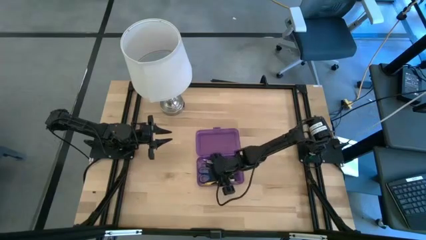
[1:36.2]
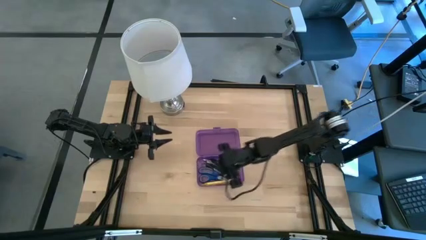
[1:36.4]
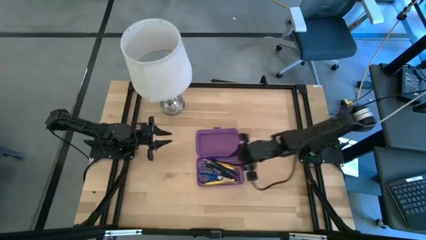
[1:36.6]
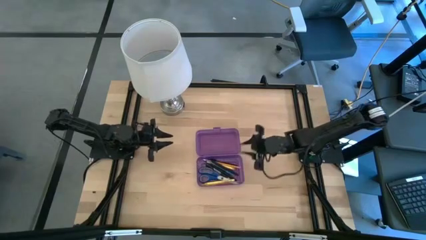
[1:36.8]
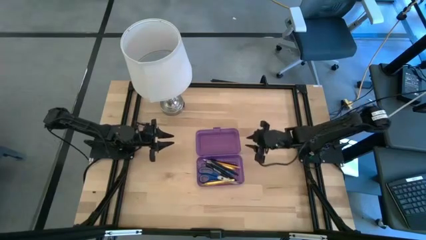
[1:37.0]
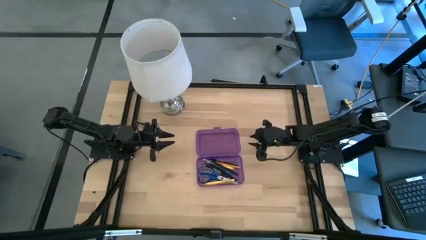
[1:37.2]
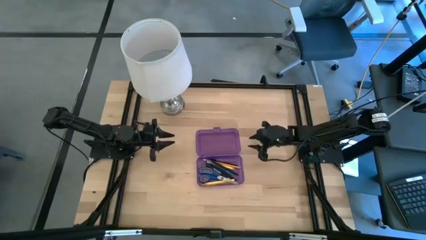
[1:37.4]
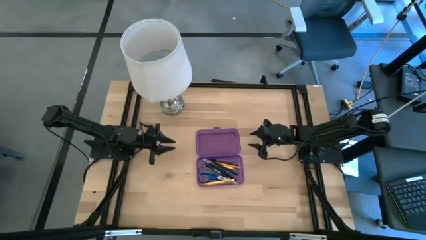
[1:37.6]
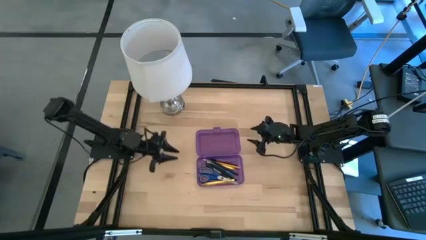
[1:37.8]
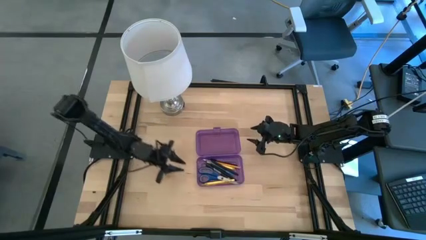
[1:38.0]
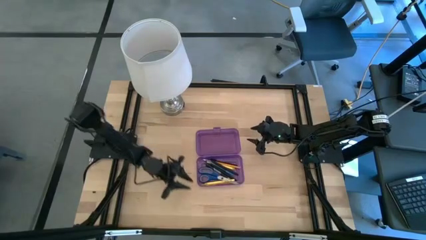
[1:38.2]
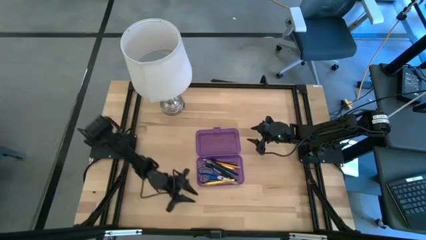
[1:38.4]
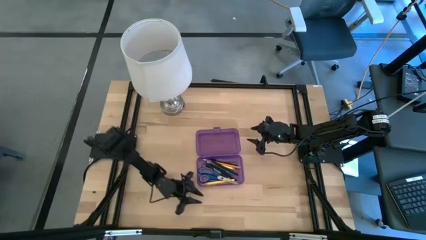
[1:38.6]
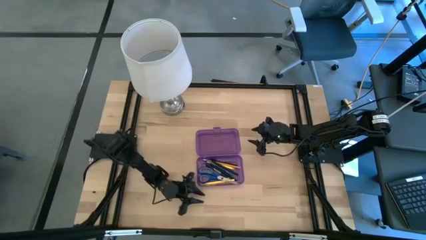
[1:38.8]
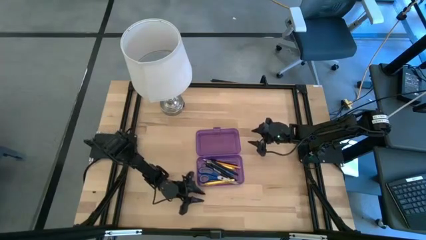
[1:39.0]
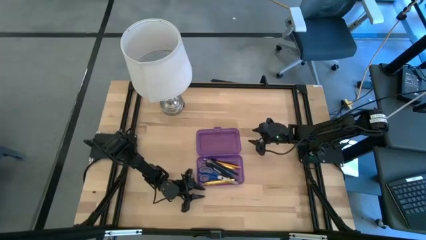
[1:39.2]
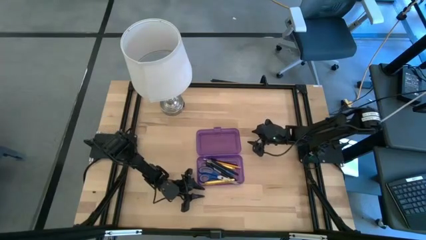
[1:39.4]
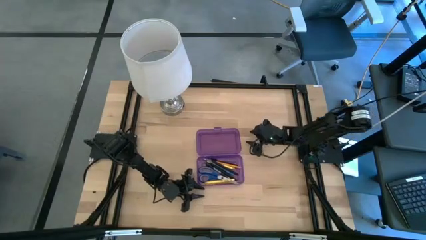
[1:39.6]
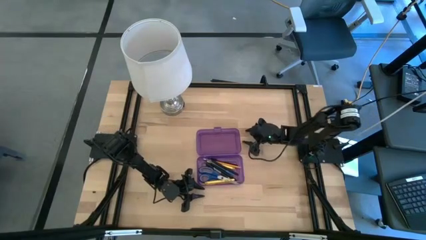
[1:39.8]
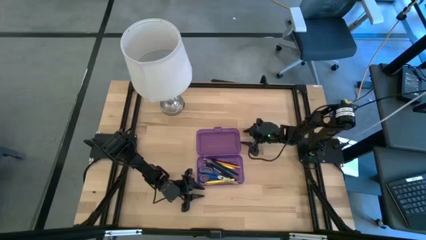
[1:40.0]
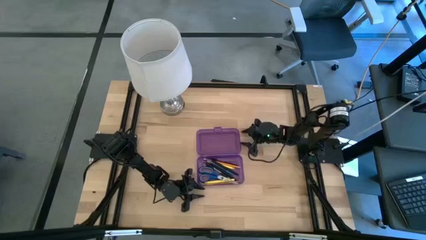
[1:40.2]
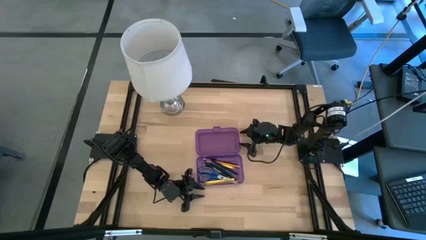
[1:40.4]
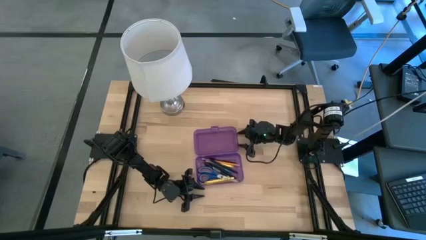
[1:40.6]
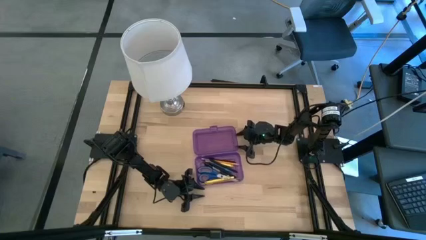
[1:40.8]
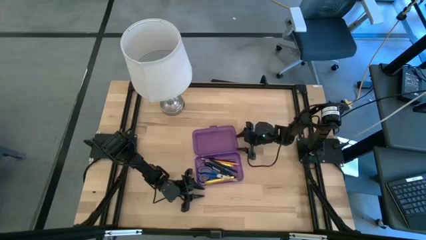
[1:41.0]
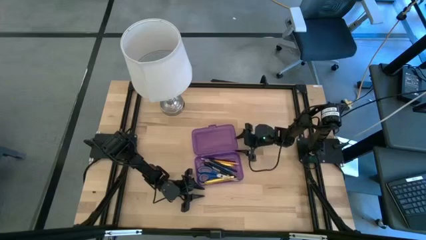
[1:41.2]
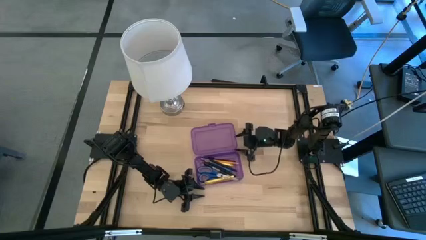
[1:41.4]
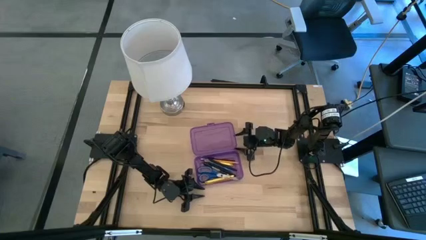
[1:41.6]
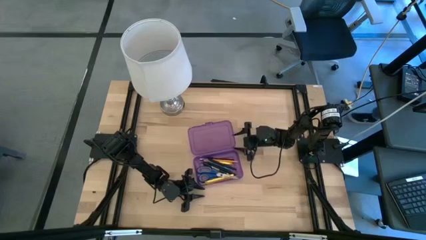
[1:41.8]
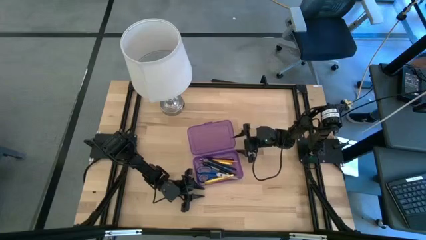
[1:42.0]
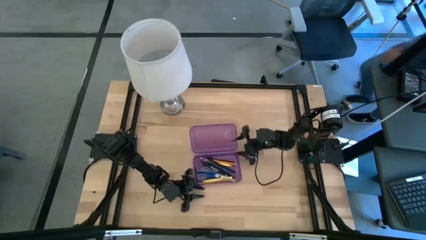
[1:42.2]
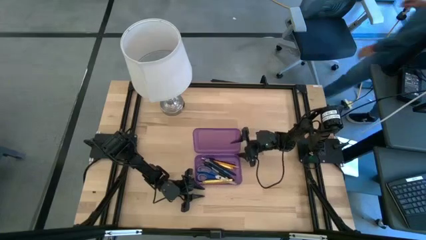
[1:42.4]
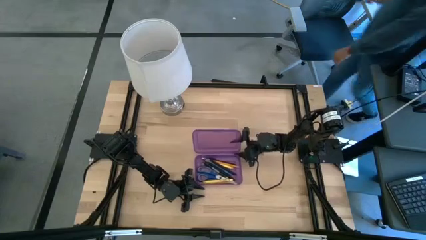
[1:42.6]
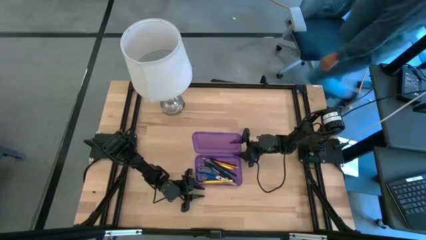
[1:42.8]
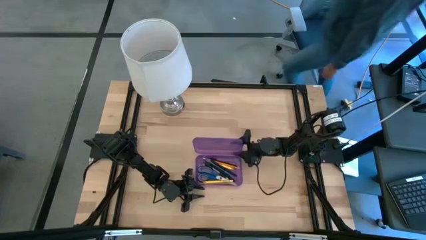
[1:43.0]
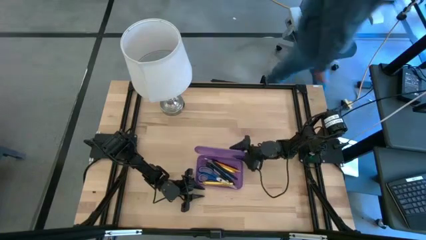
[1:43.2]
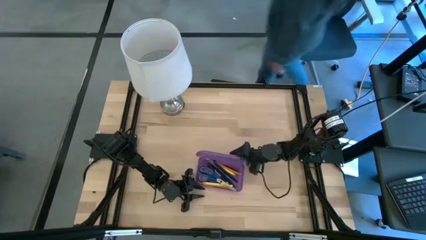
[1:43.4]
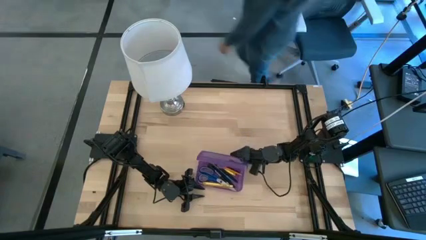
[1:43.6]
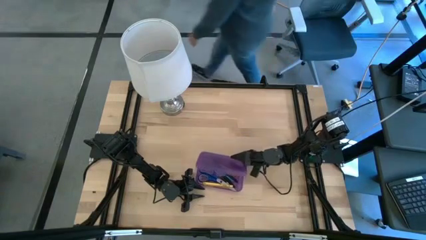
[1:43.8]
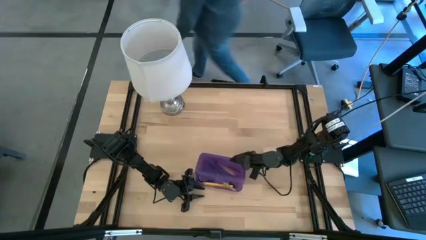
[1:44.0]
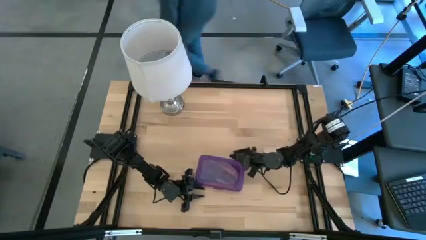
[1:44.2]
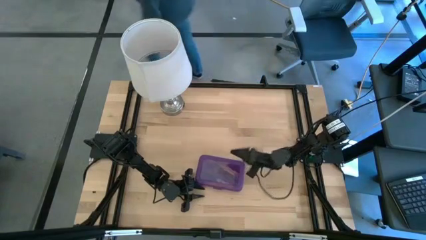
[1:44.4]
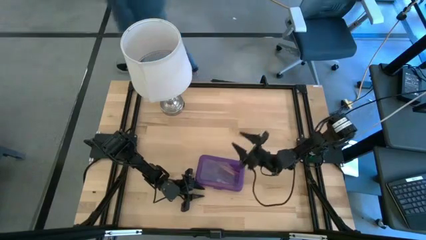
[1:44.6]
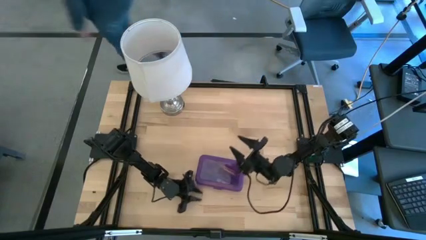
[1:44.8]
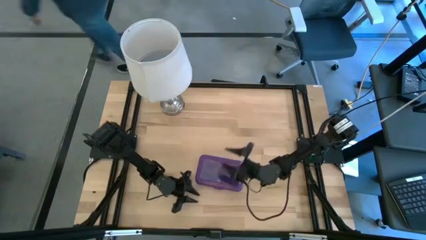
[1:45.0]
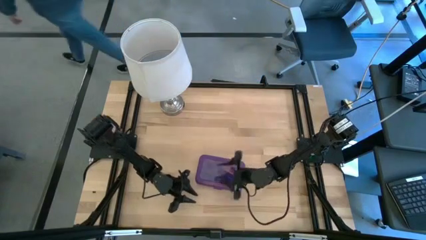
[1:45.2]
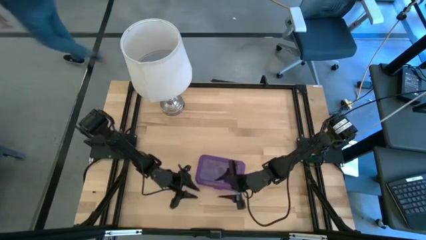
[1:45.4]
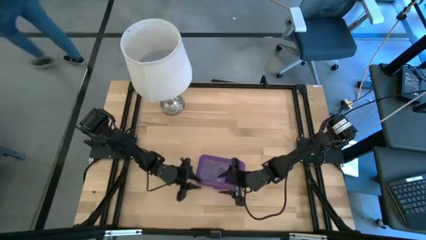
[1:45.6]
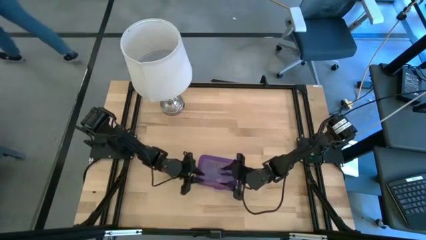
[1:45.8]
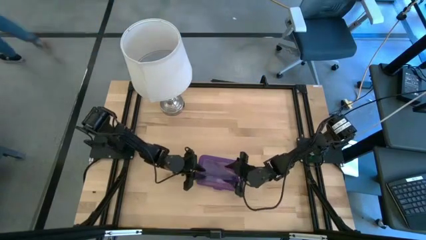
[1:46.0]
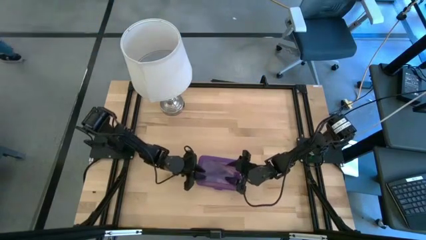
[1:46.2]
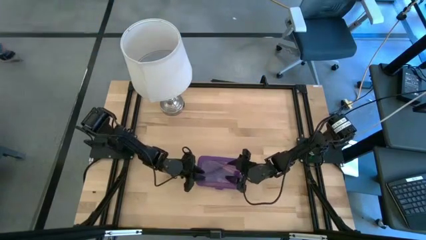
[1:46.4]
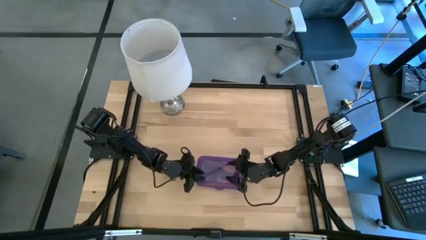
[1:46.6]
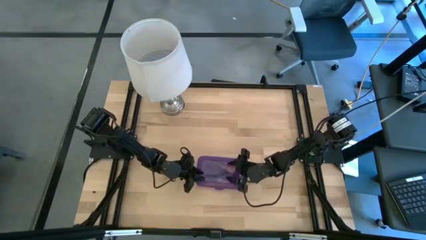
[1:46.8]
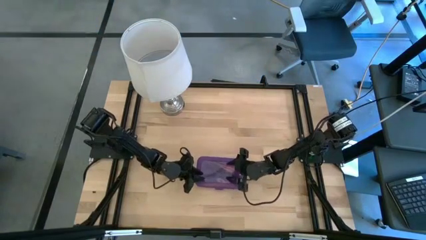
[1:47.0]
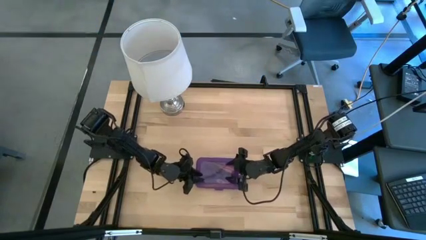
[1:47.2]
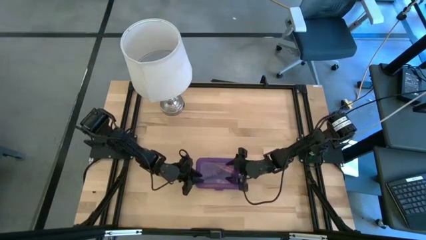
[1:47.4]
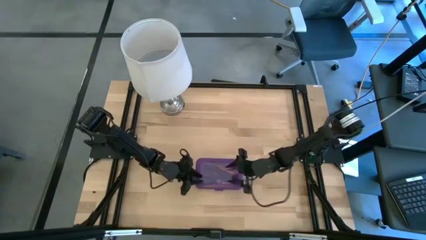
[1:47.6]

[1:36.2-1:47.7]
Task: Pick & place school supplies into a supply box
Close the purple supply box

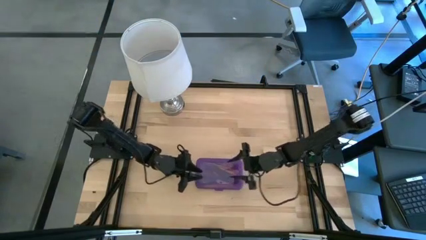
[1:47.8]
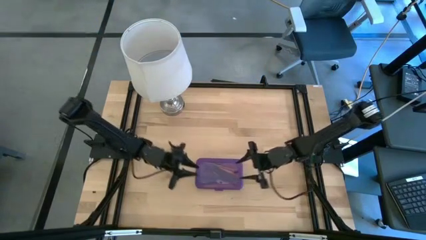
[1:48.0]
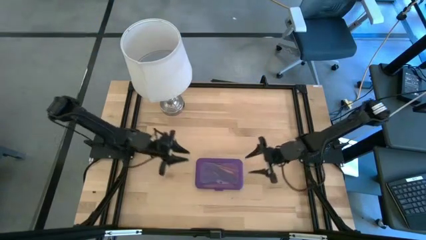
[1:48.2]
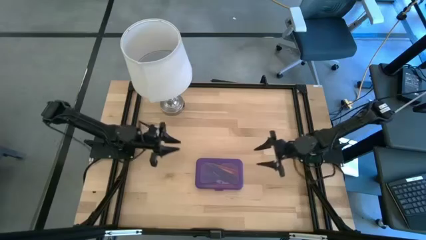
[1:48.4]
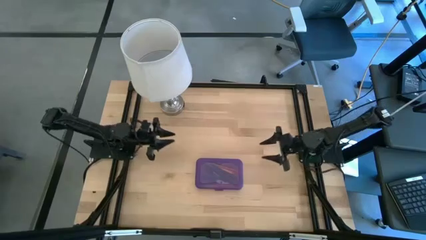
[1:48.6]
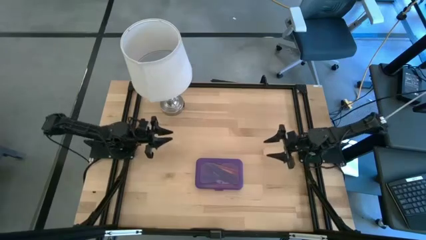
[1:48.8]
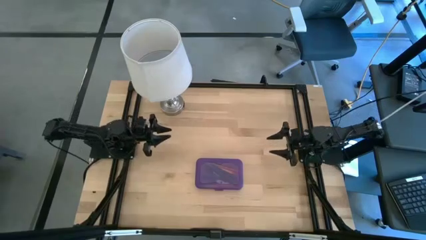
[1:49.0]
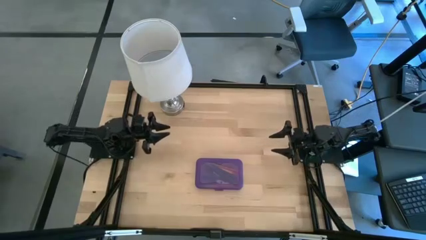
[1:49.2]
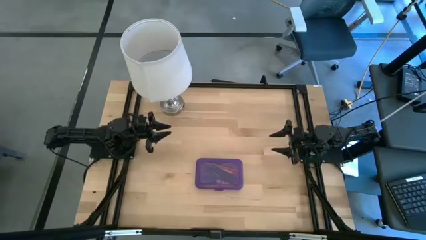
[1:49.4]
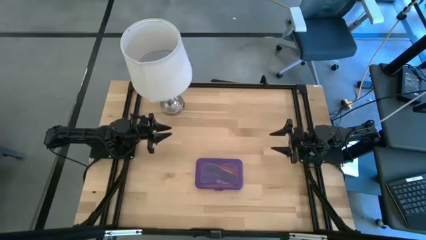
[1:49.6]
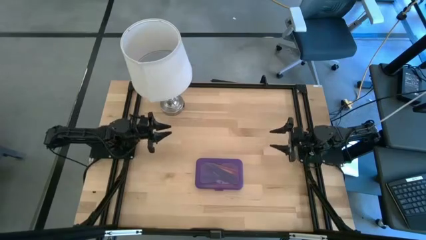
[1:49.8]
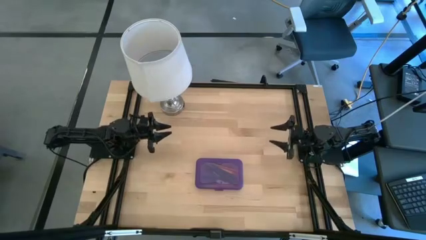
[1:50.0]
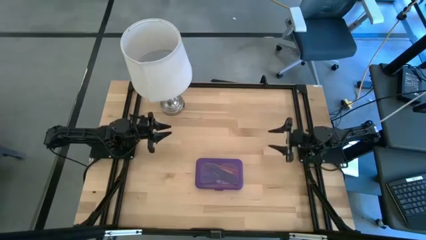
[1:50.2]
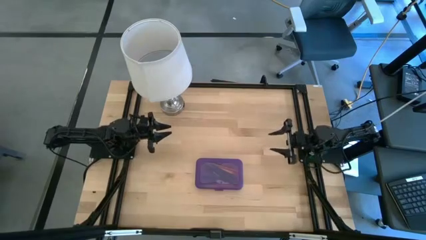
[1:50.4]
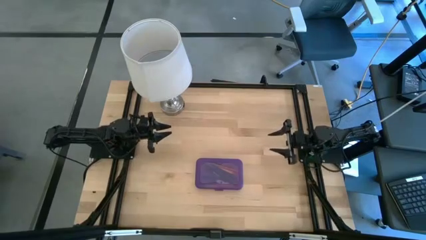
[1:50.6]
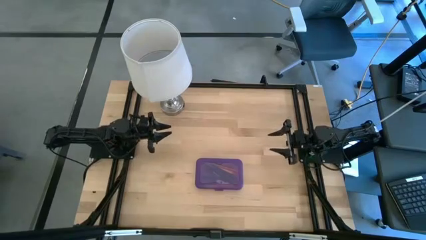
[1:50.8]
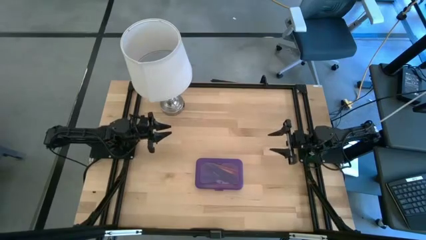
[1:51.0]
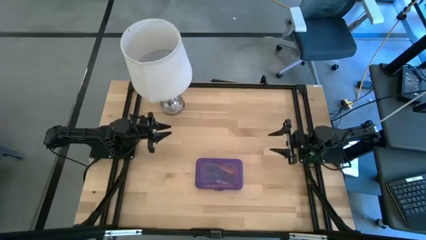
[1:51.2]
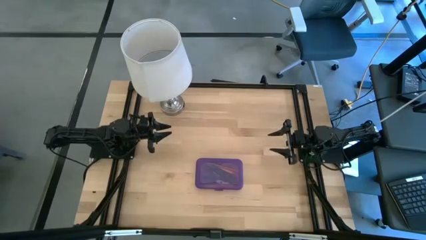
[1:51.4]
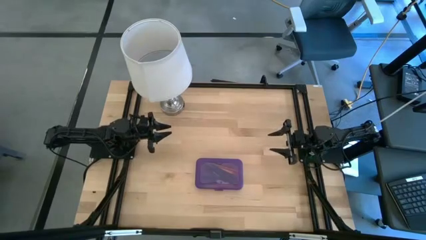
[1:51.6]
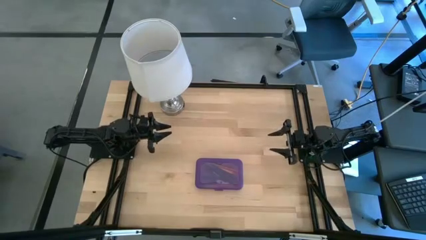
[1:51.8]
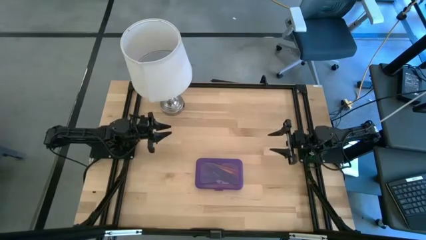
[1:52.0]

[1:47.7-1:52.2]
Return to Home Position
